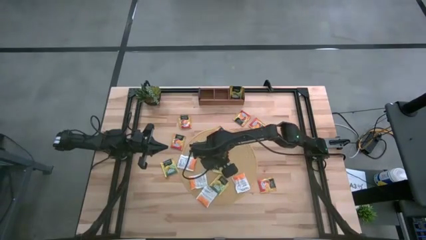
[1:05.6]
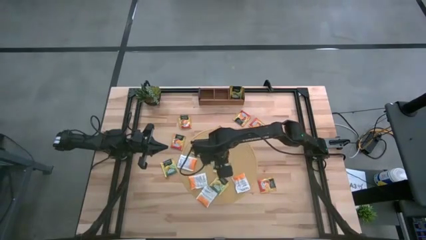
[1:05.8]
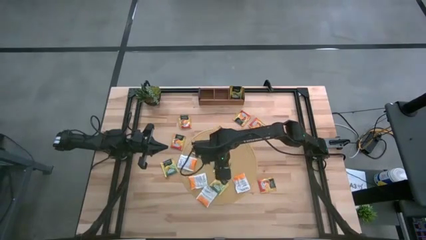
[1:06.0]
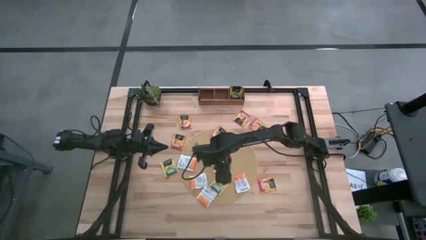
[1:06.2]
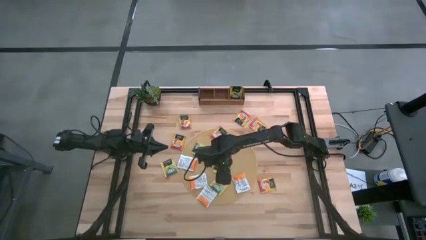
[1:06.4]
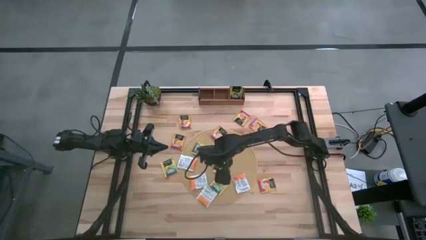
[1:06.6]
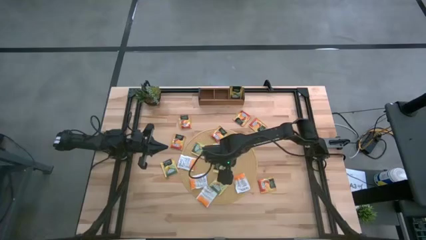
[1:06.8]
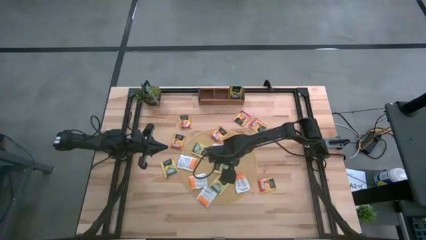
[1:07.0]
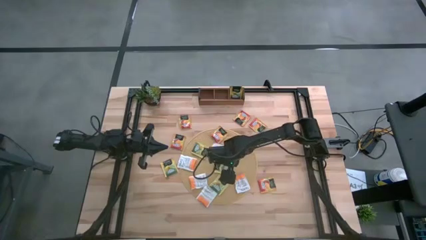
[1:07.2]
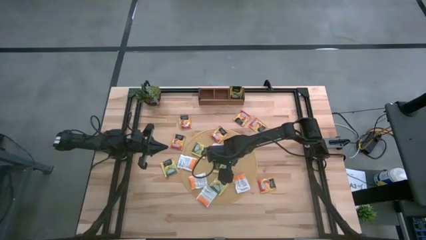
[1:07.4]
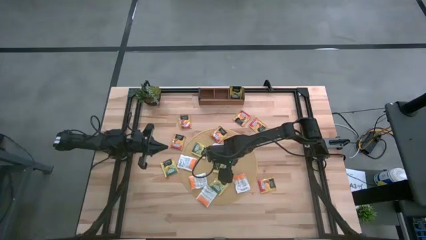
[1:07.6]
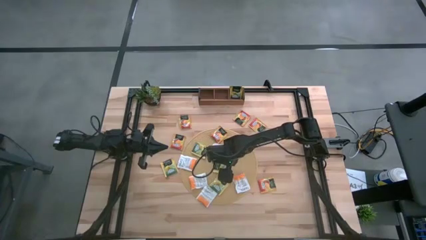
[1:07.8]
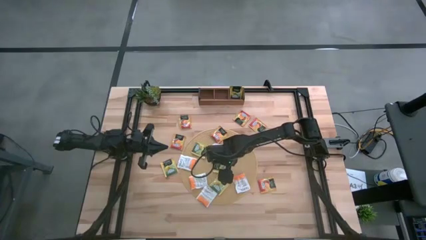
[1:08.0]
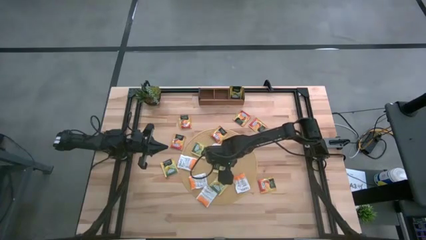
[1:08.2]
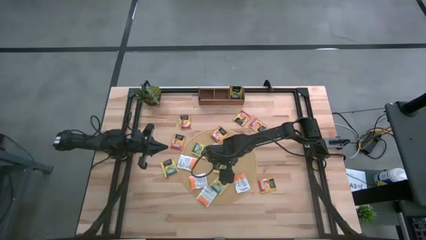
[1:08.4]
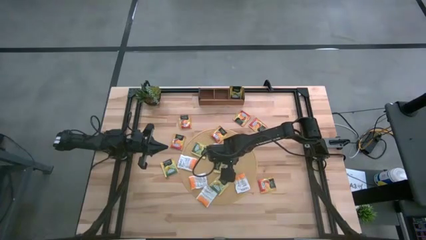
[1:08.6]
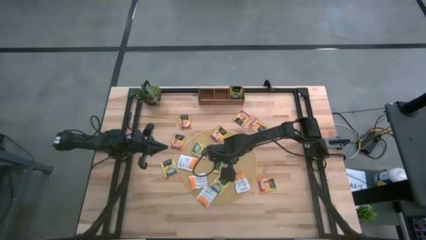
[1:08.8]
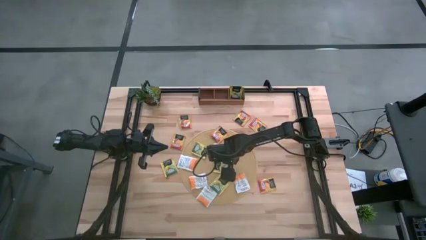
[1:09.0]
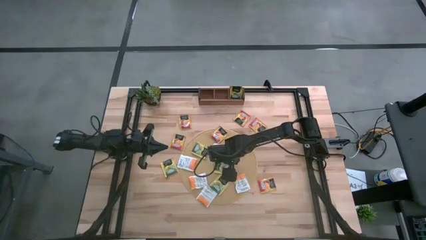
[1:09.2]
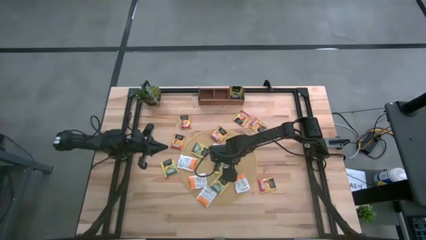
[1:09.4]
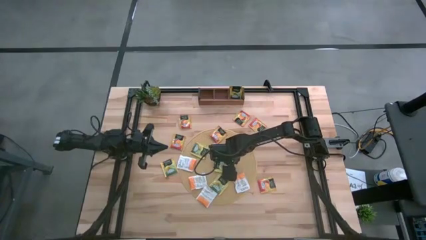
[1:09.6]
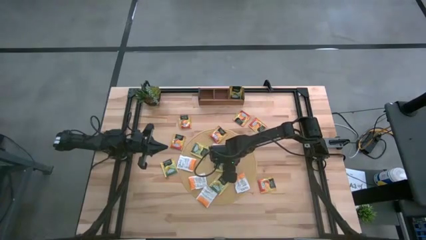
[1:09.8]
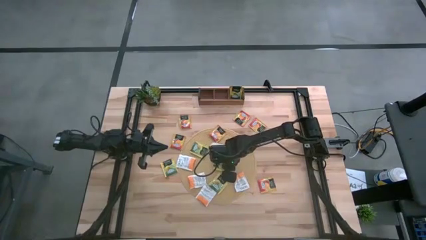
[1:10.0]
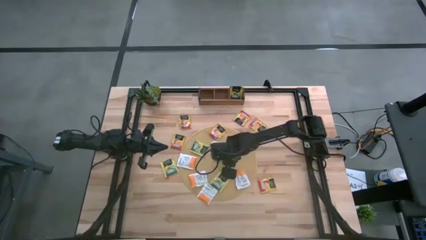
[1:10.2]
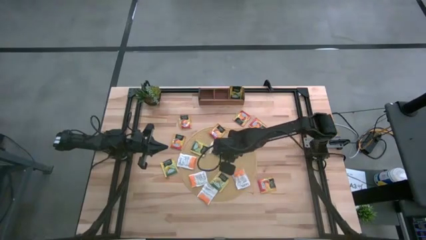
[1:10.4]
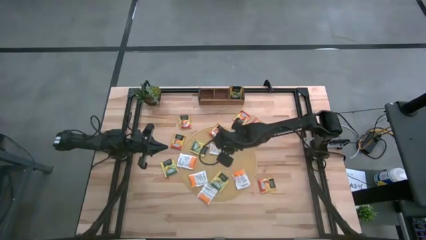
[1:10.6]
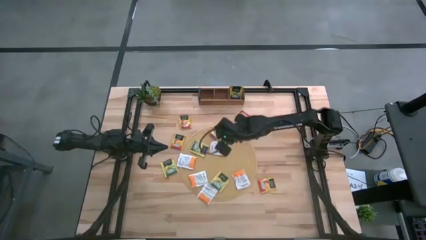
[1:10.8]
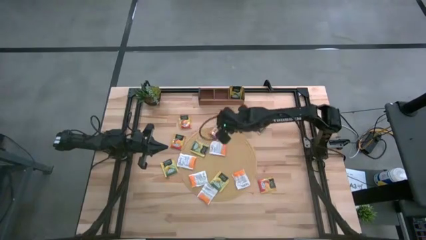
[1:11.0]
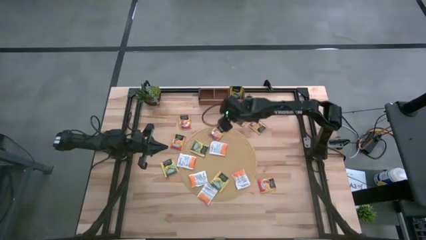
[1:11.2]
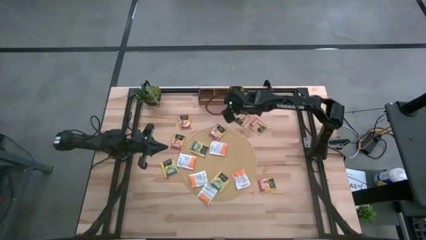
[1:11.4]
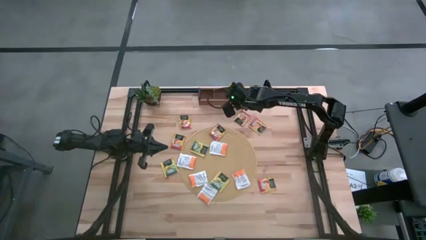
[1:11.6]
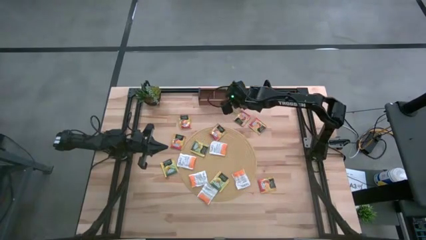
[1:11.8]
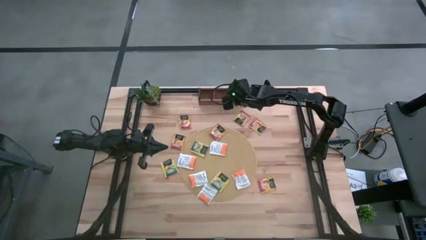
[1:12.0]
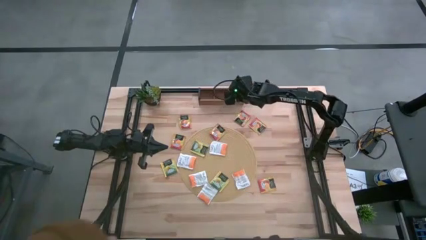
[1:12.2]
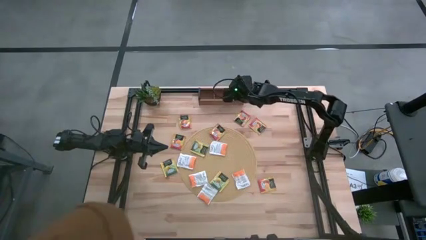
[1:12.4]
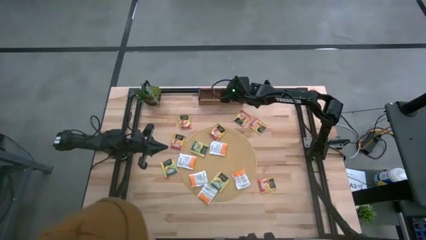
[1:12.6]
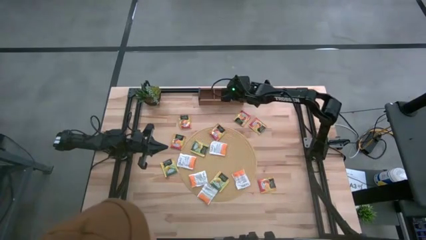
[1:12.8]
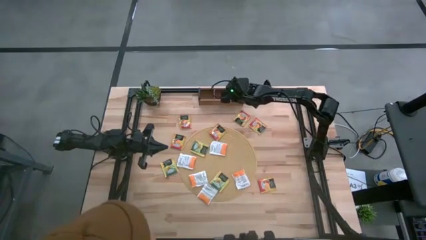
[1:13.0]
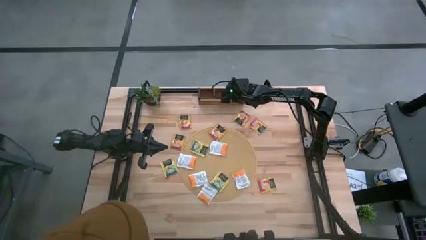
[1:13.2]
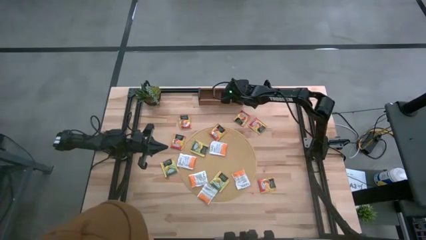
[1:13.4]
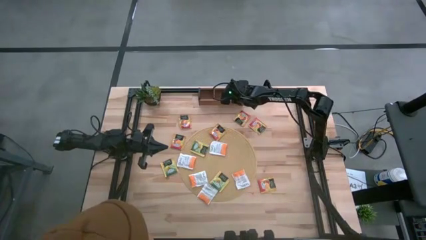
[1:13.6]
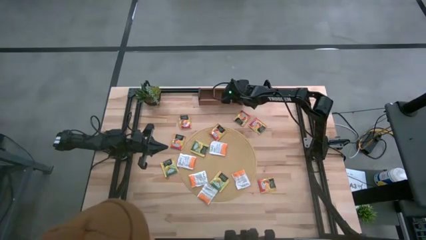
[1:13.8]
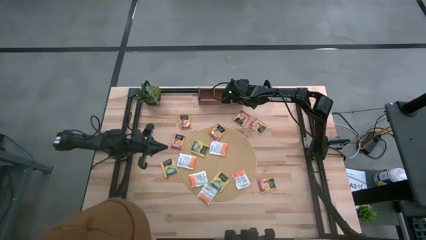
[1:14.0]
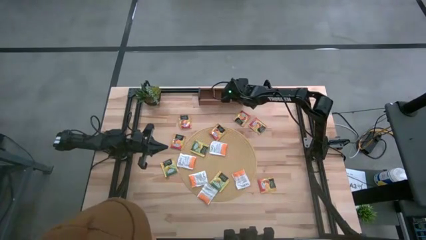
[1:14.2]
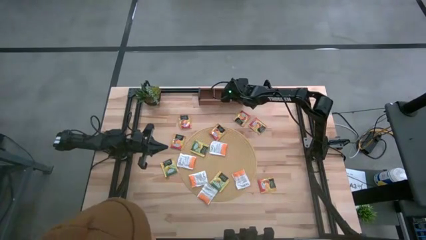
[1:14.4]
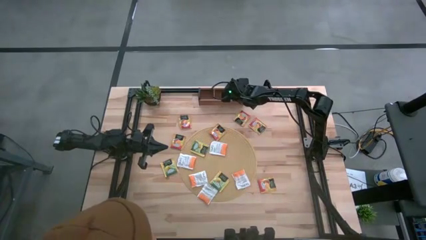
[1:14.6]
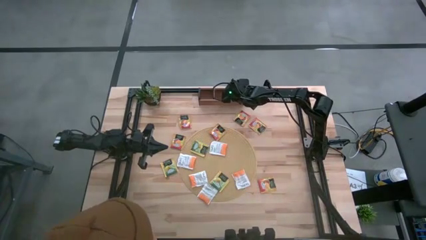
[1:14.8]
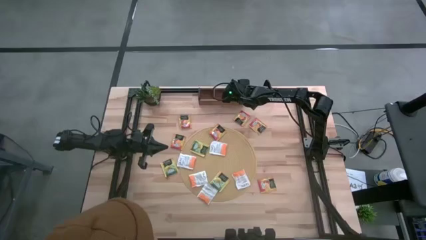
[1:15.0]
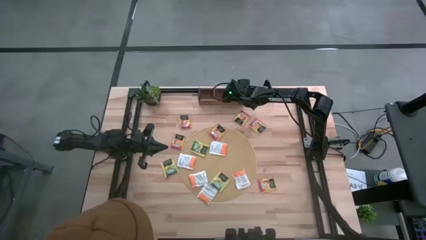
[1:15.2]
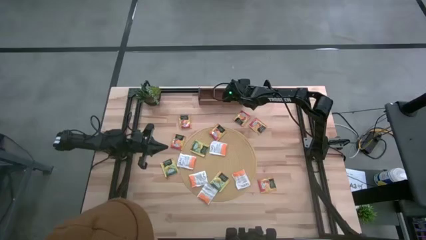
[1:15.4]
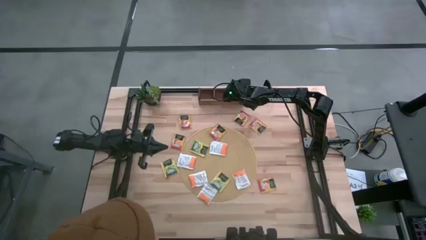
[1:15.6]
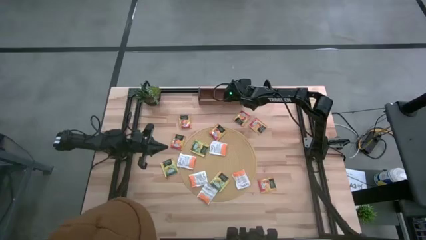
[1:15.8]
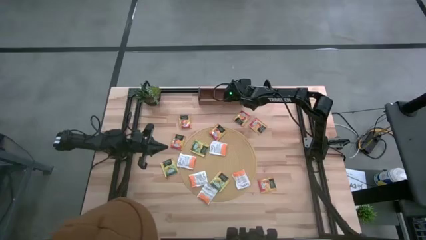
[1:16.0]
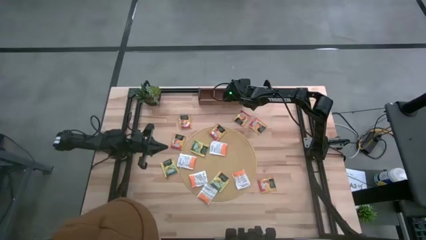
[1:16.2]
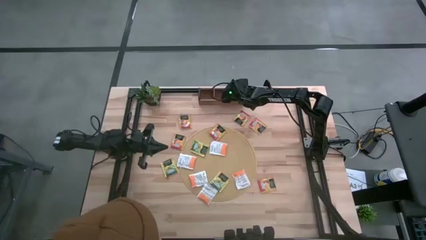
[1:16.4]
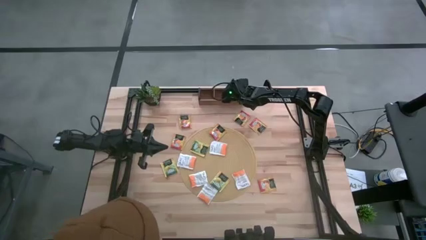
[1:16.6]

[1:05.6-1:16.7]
Task: Pick & Place Tea
Put the yellow tea bag into the right section of the wooden organizer

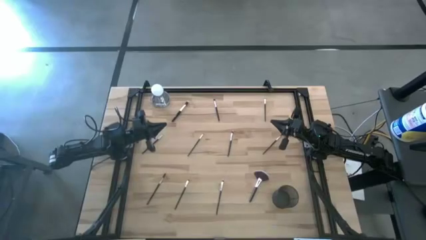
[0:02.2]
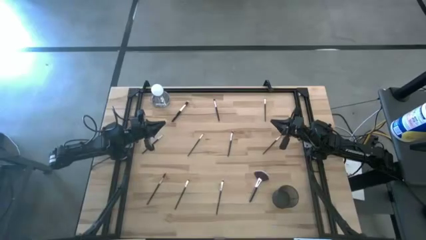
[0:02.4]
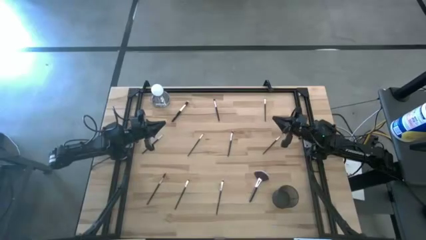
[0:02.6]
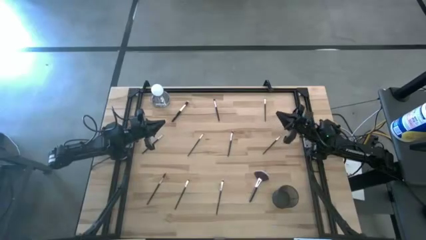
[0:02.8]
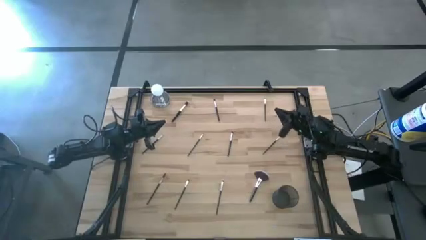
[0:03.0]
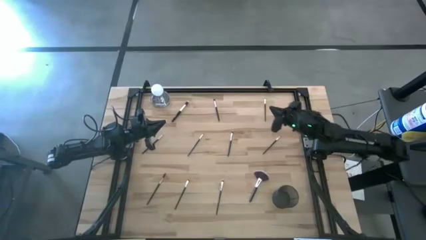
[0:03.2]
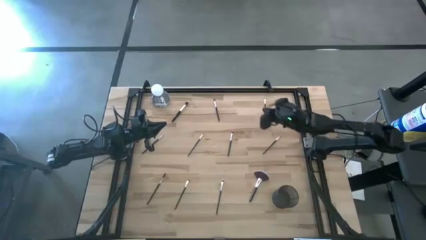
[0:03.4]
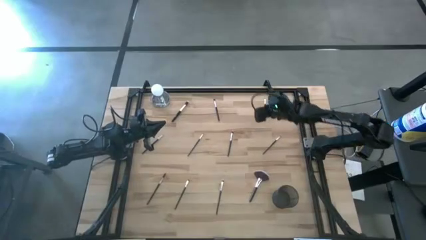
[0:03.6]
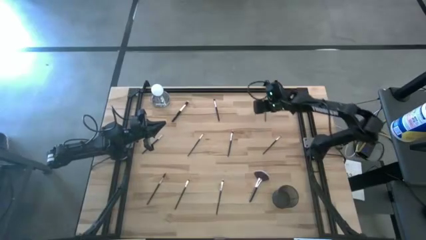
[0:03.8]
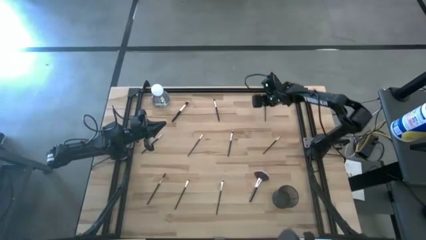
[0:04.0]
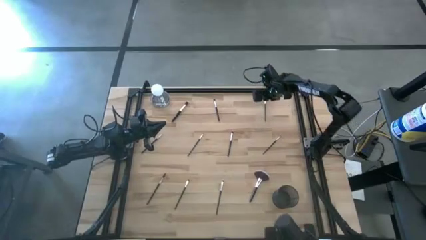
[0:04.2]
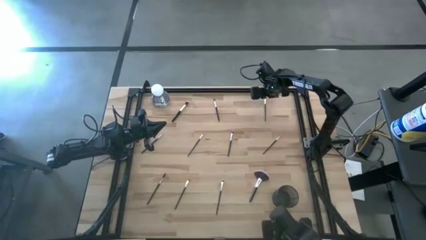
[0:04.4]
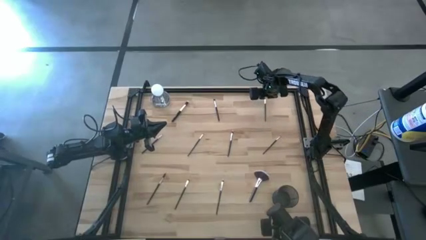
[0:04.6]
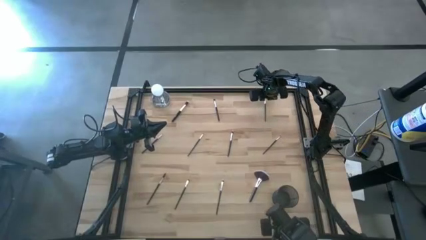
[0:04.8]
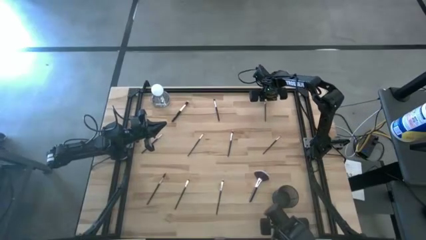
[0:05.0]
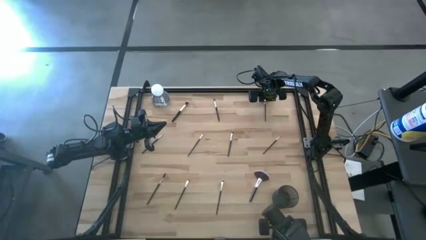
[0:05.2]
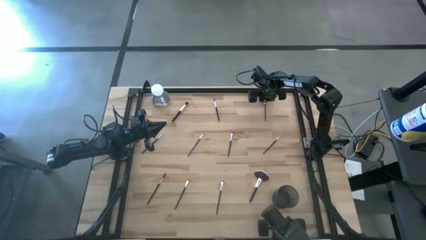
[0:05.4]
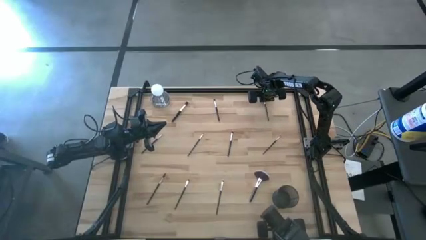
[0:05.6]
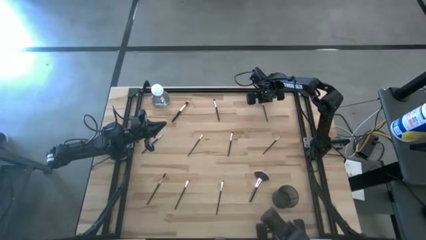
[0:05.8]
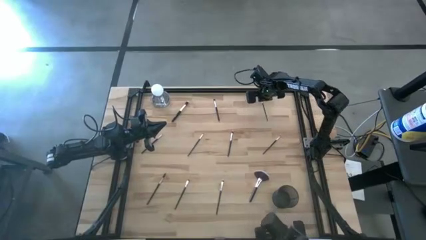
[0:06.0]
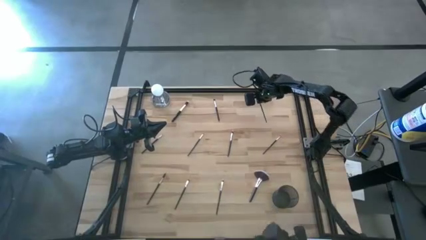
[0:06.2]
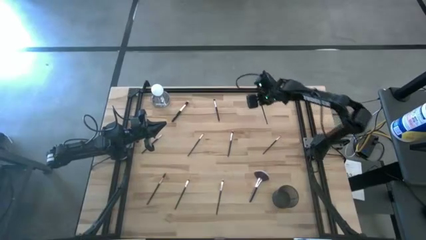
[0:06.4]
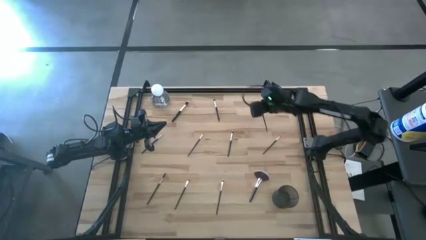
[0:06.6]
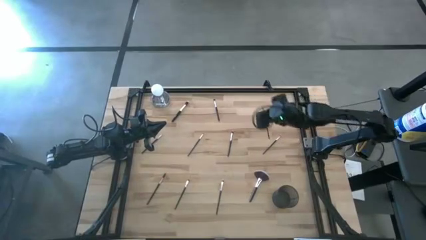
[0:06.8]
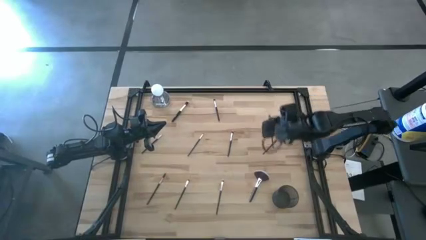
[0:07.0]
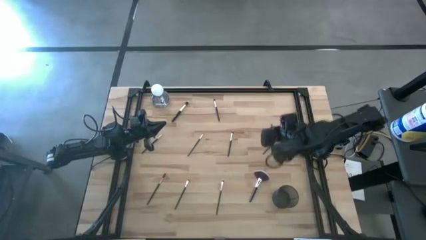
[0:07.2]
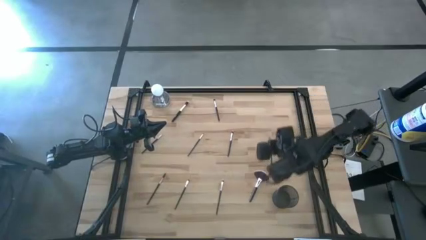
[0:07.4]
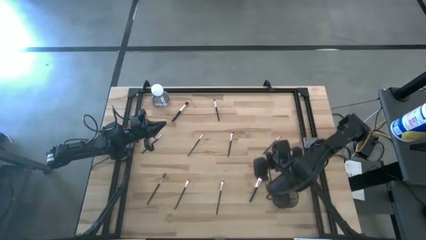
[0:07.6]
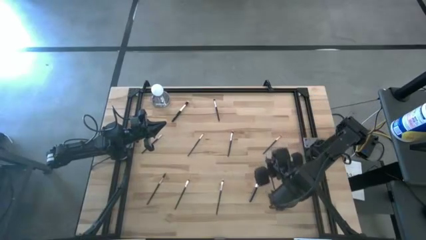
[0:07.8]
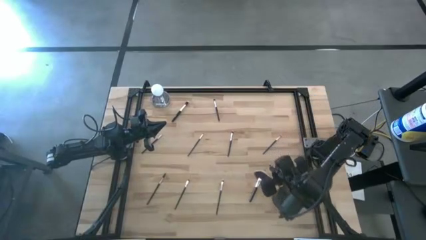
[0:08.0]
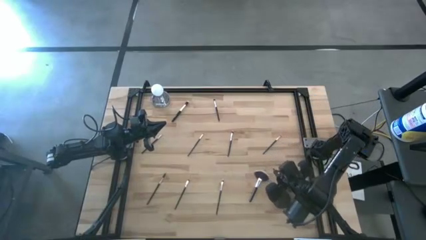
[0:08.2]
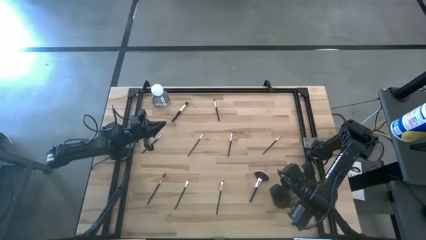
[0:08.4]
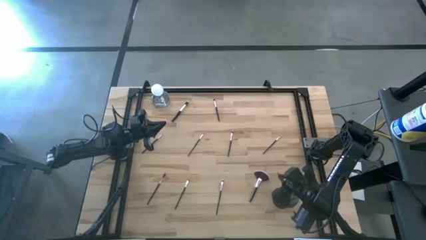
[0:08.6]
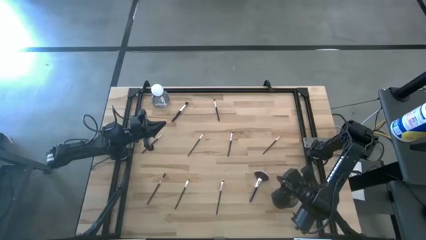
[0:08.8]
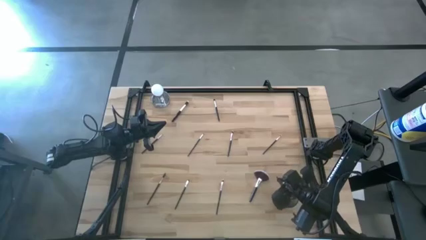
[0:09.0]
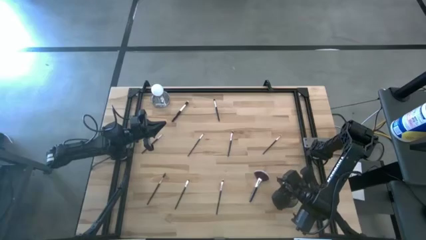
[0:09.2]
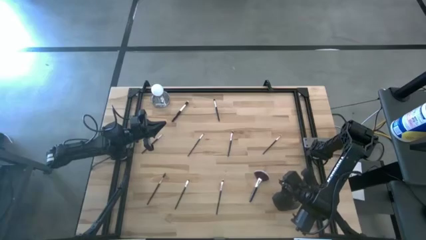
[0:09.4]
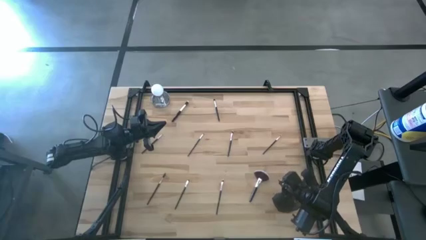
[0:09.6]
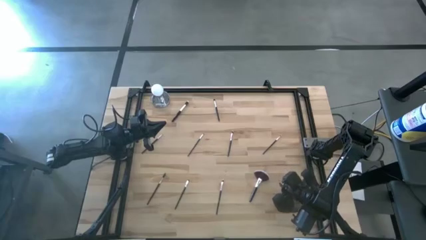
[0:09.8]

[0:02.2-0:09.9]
Task: Put items in baskets/containers
Put the eyeshadow brush into the brush holder
